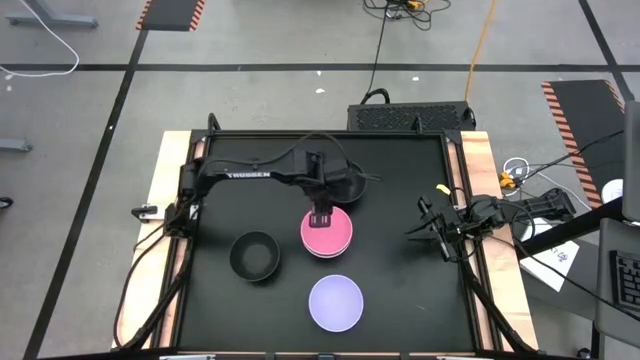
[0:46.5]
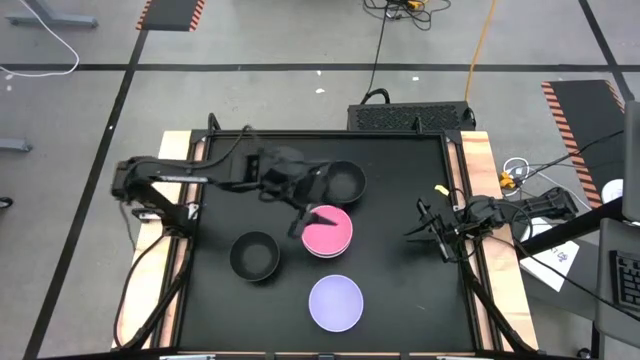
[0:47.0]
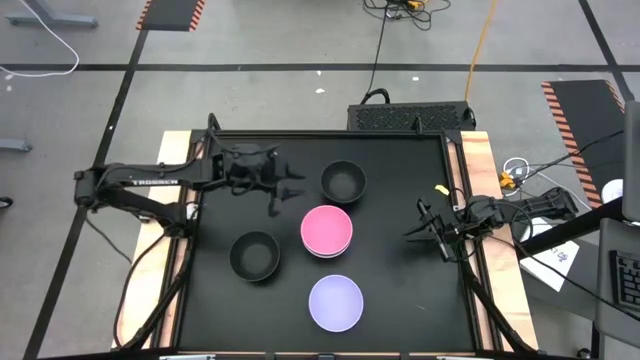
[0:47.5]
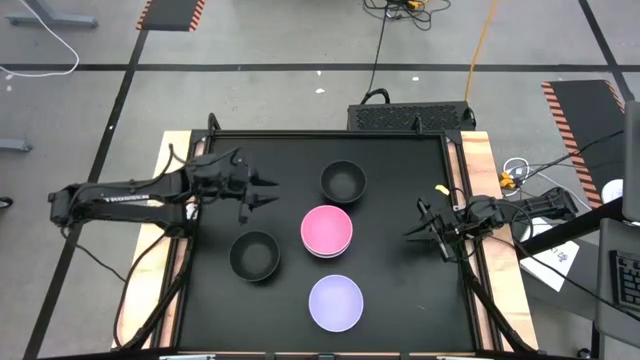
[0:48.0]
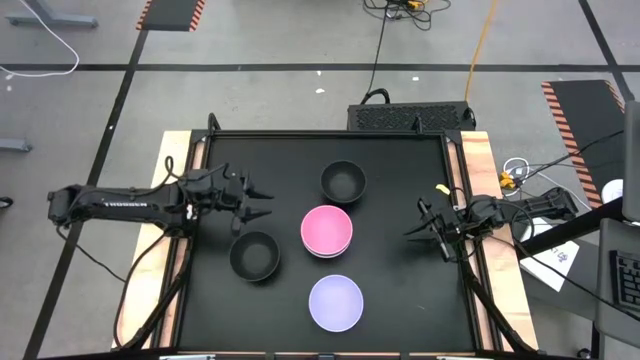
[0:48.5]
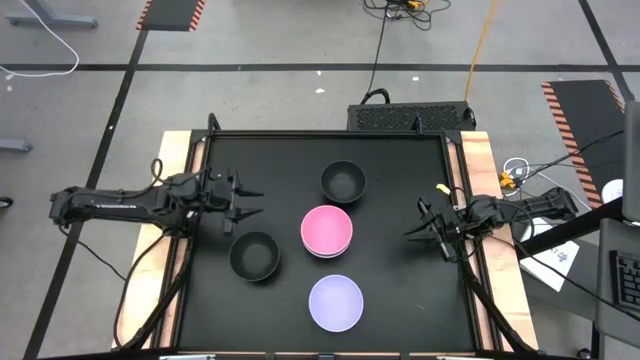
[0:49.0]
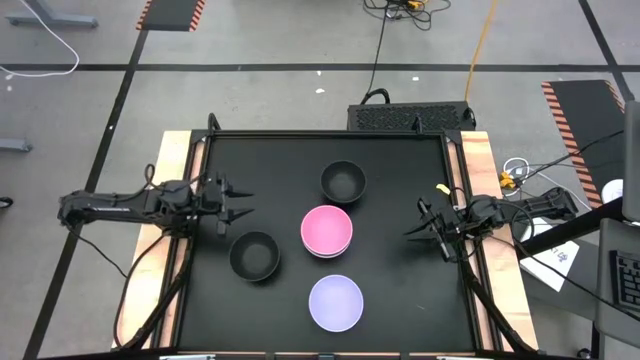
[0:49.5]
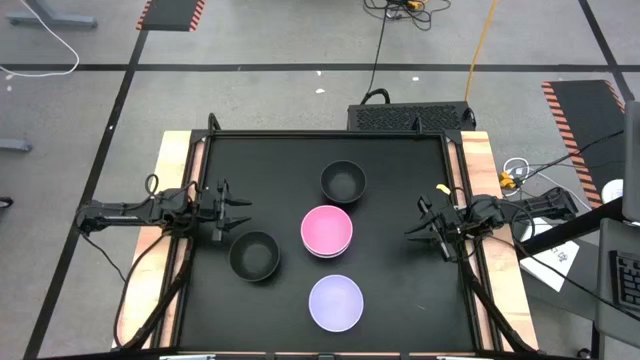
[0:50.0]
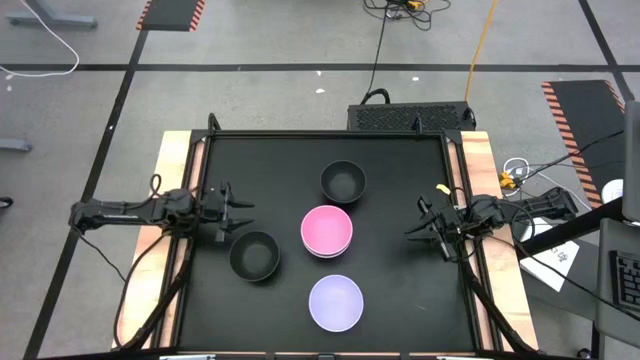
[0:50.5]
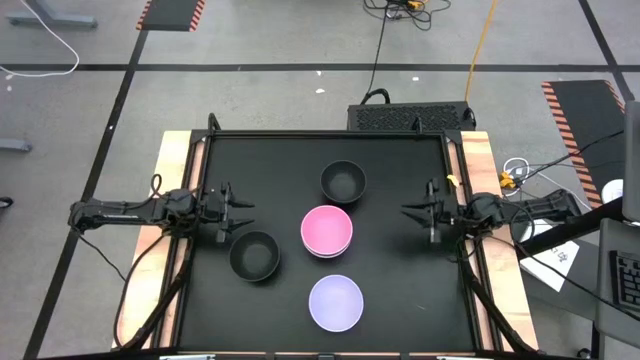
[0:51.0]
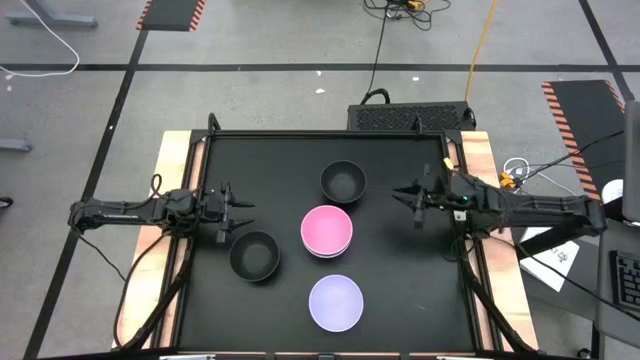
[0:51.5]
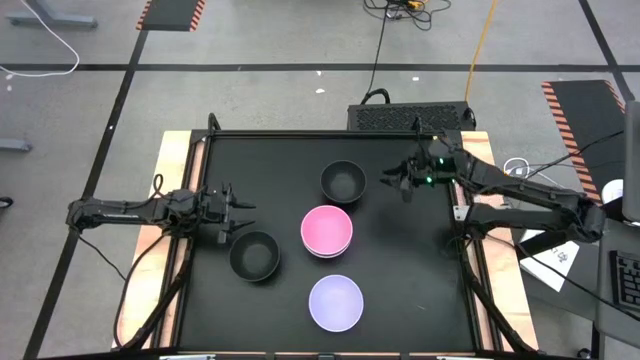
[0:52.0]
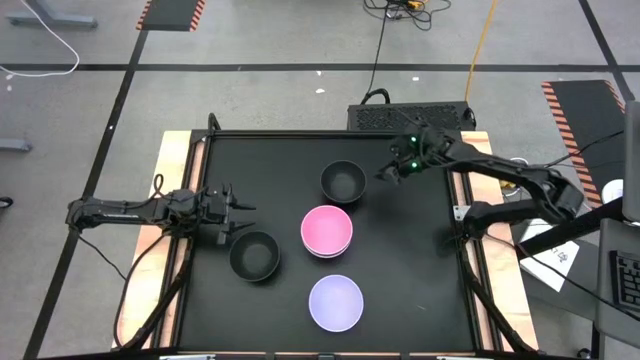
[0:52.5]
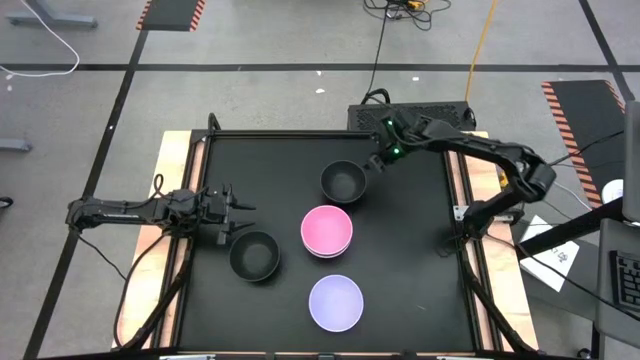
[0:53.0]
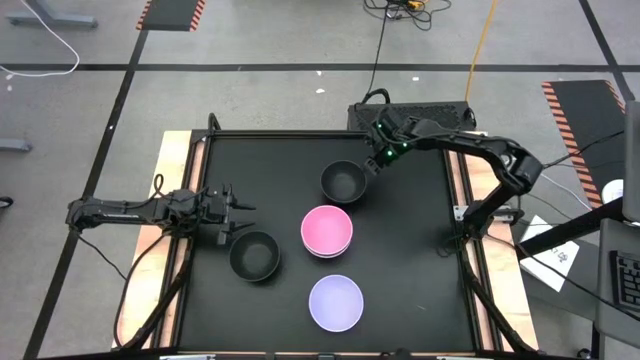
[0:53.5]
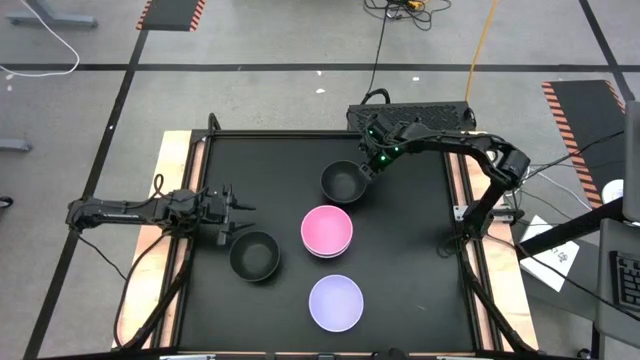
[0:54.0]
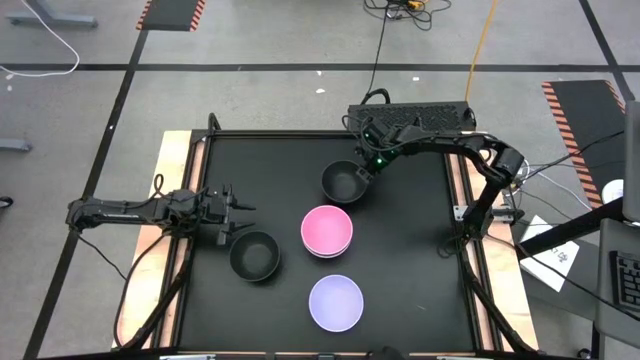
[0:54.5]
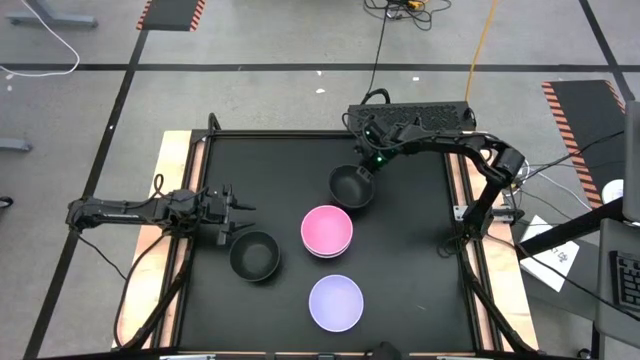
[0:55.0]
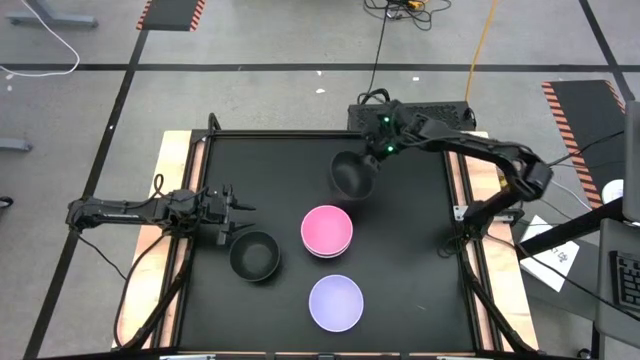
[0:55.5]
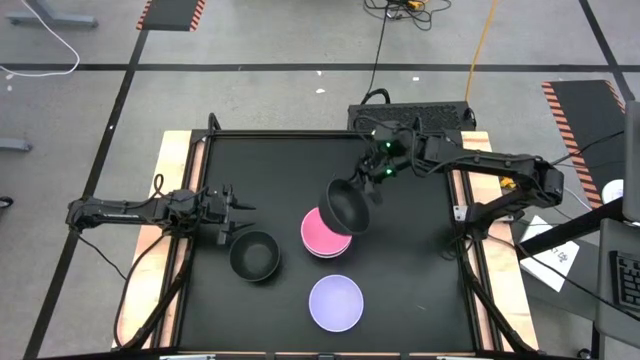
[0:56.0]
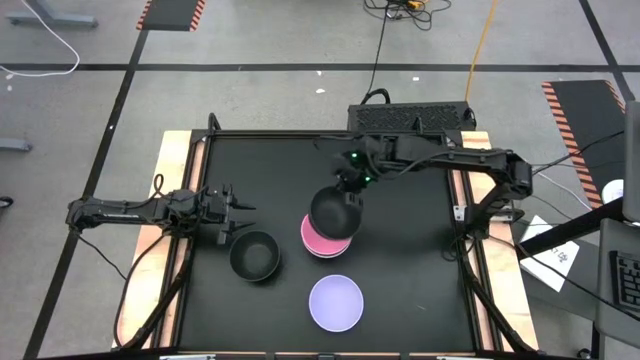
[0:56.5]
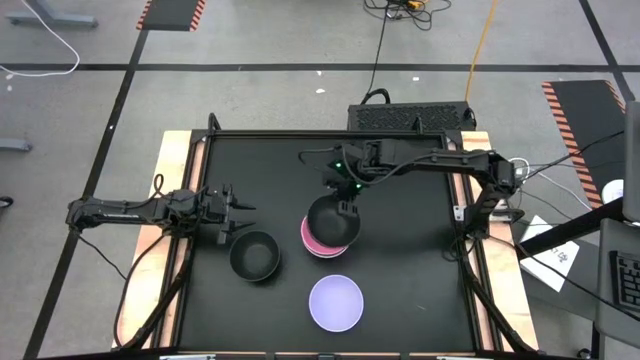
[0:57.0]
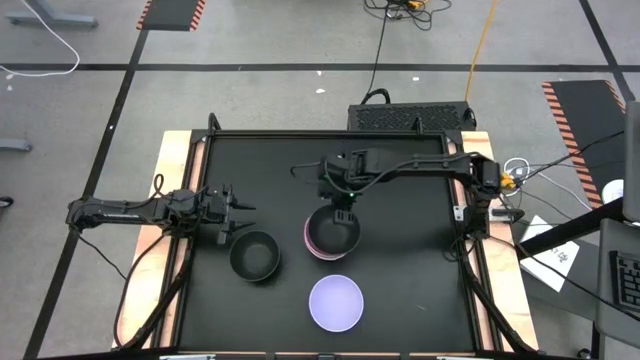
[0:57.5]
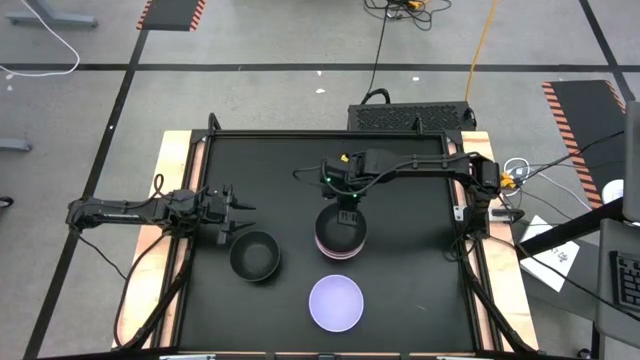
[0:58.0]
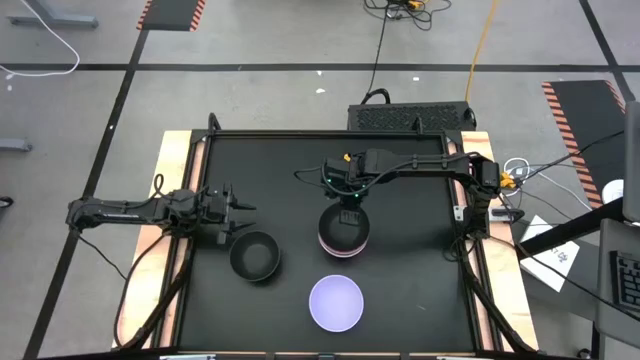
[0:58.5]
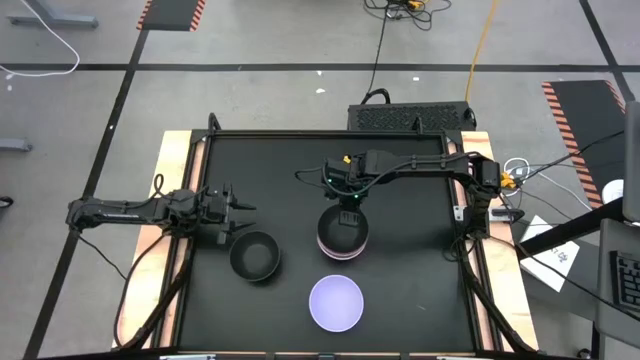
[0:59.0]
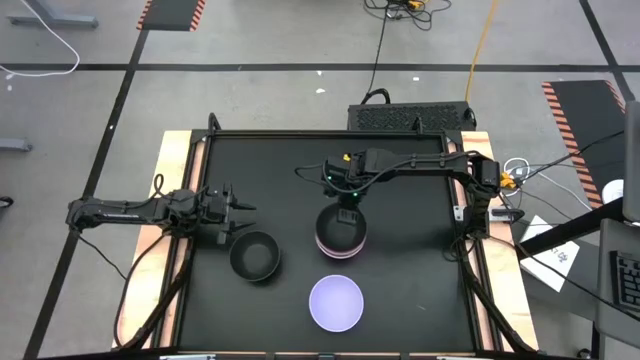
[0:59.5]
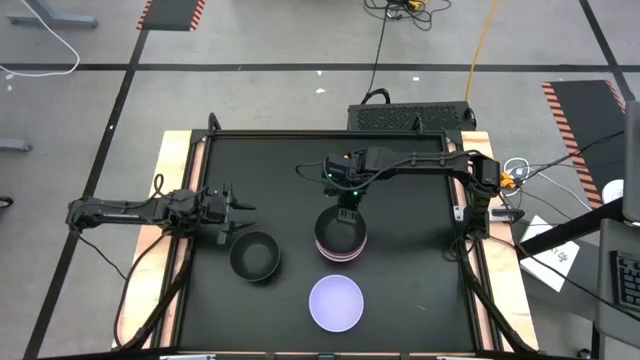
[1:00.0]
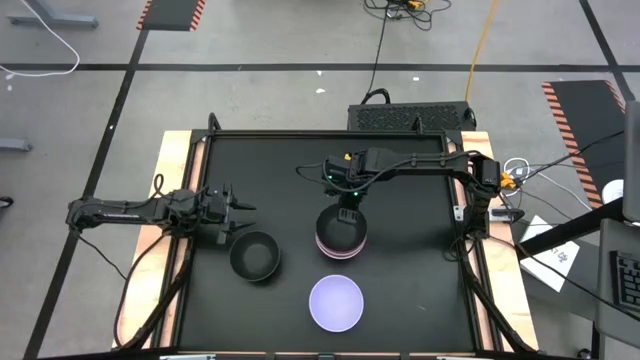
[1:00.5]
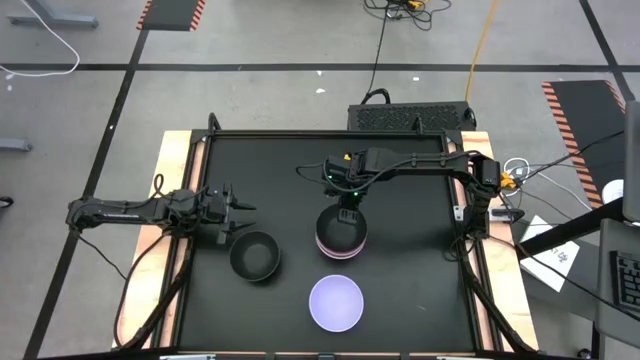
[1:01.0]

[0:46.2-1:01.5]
Task: Nest bowls inside each other
Stack the top black bowl on top of the top pink bowl

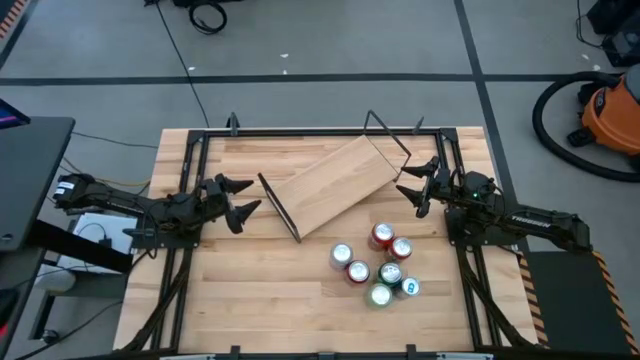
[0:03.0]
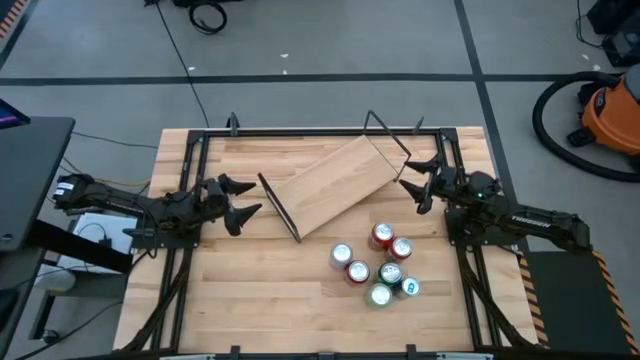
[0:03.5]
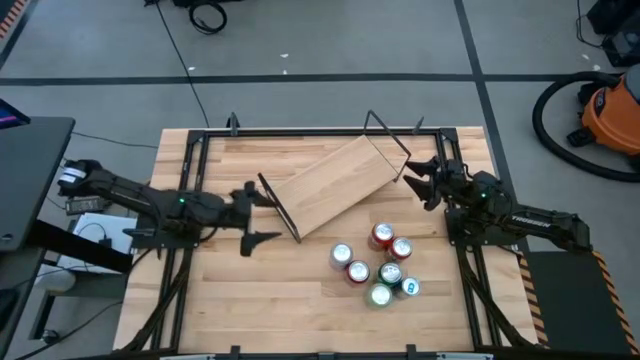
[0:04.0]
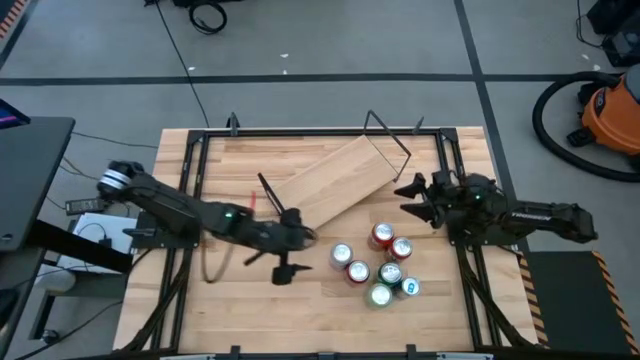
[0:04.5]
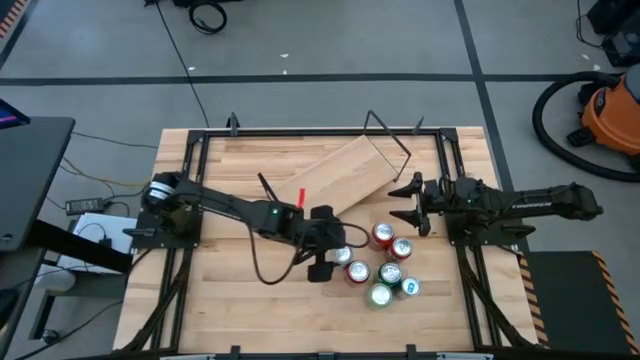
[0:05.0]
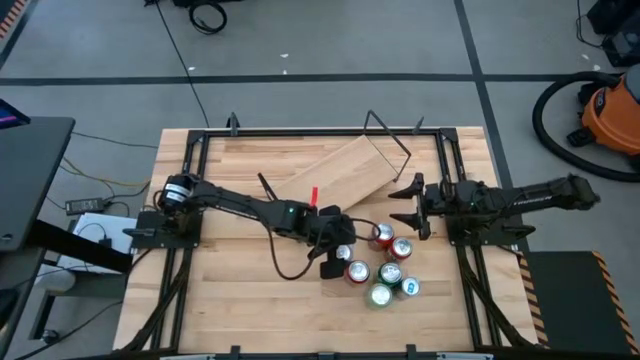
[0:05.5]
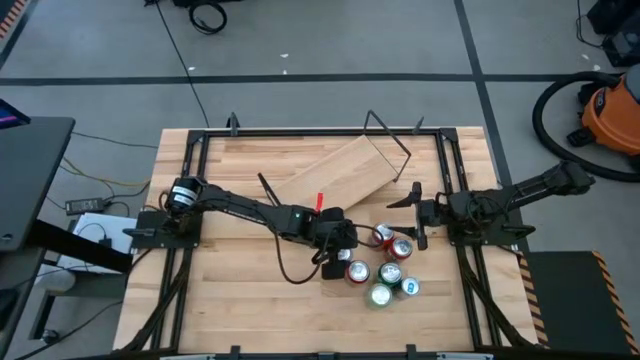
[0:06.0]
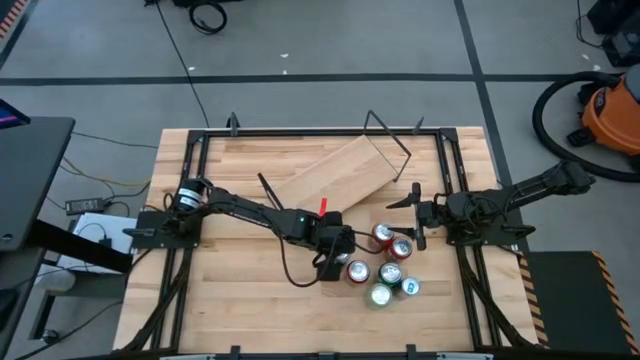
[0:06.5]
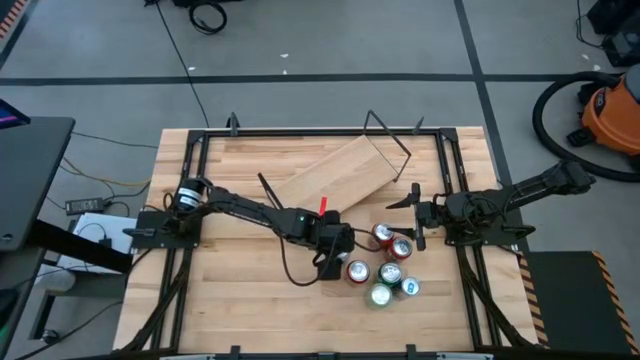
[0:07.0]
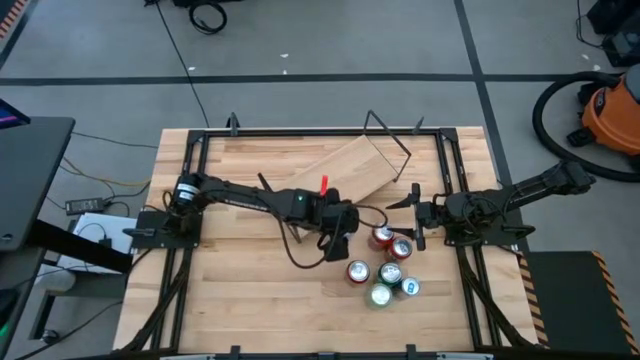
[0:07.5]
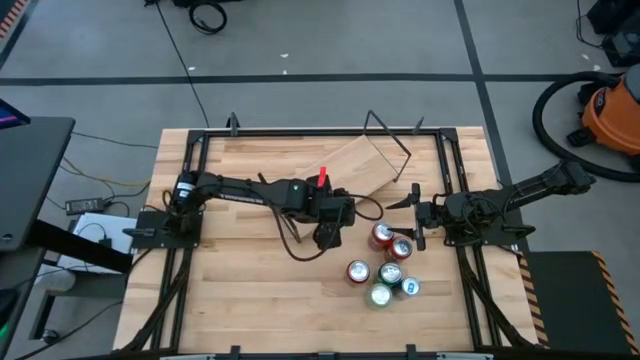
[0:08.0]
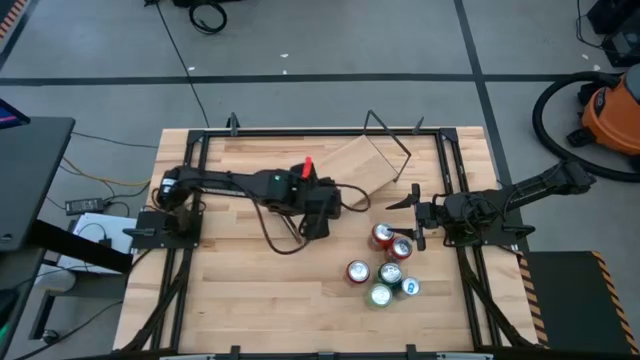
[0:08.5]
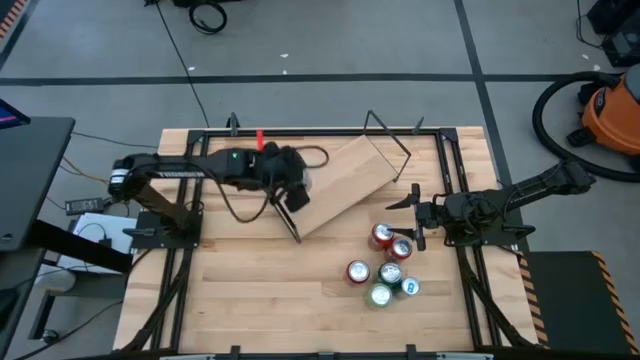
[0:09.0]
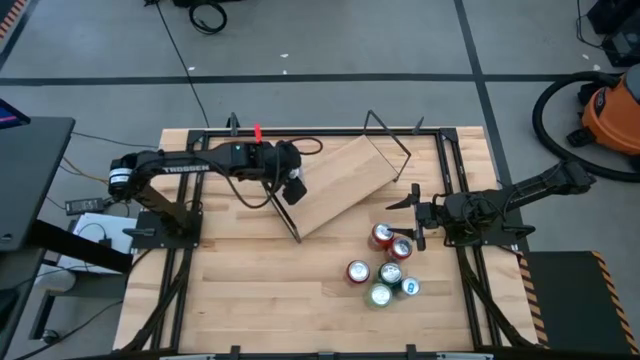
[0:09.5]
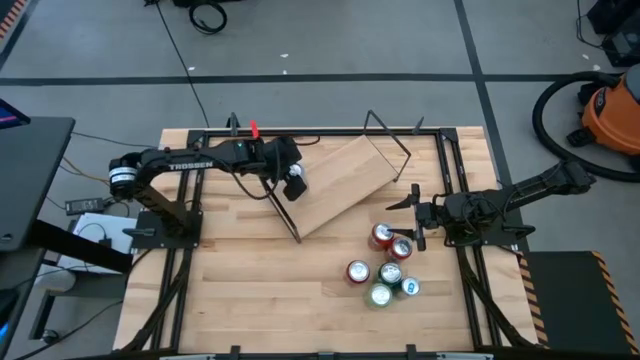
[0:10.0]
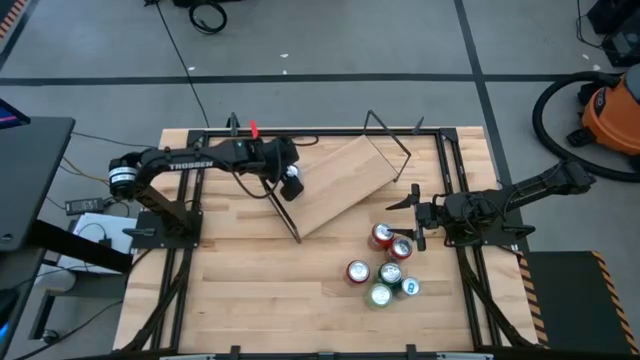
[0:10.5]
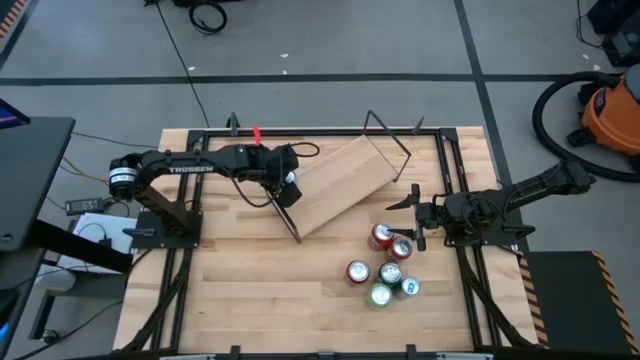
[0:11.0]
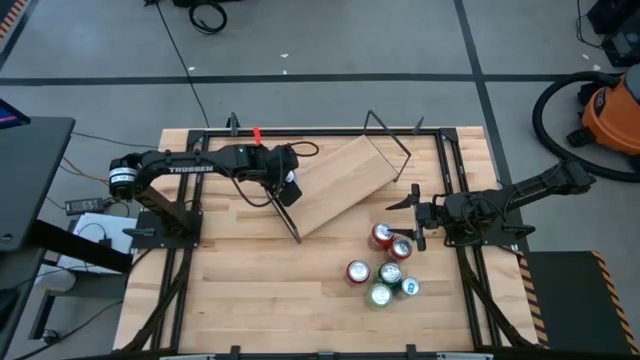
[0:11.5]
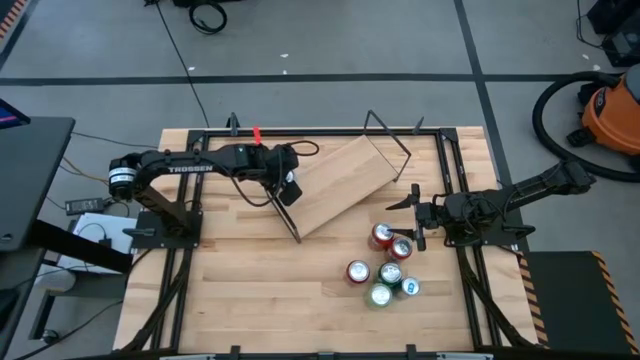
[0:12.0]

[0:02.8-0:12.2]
Task: Place canned beverage on shelf
Put the orange white soda can on the shelf
